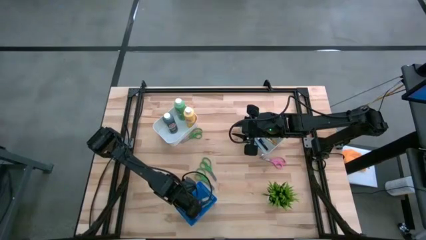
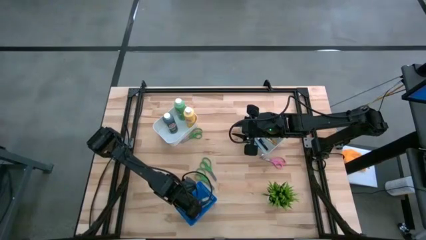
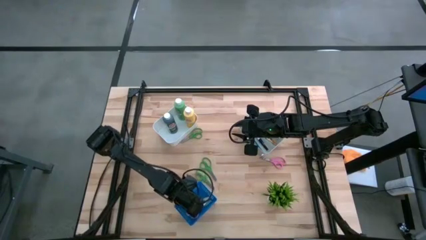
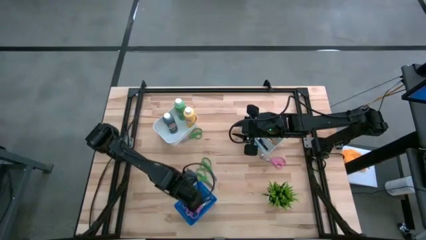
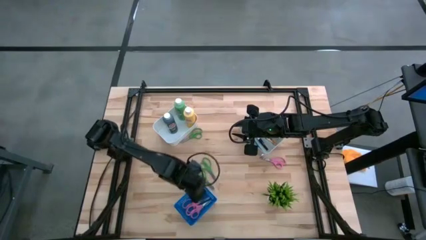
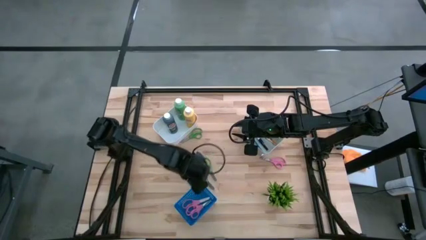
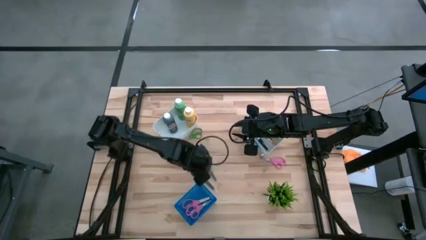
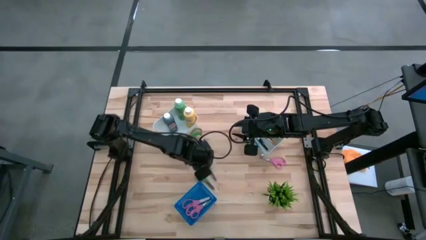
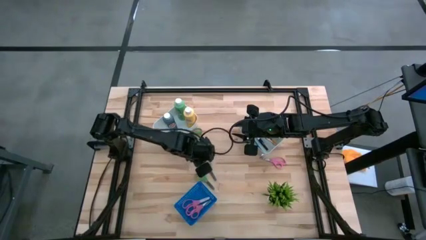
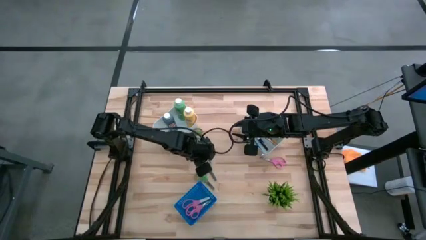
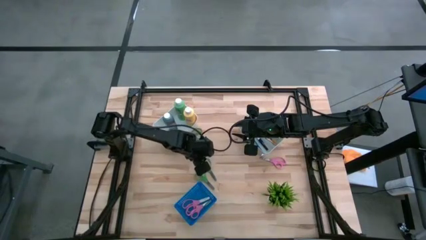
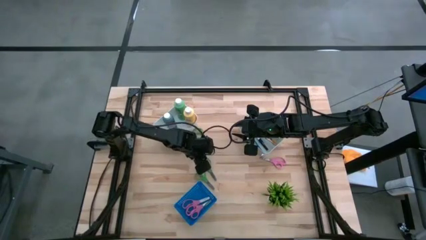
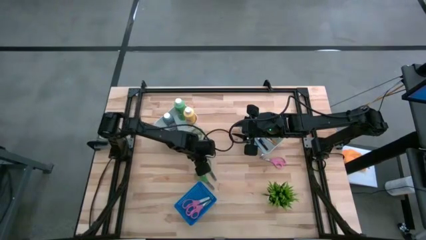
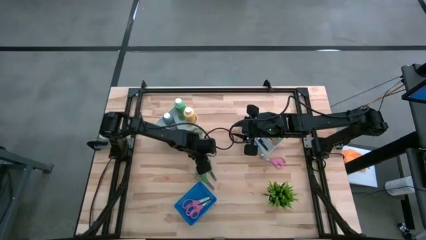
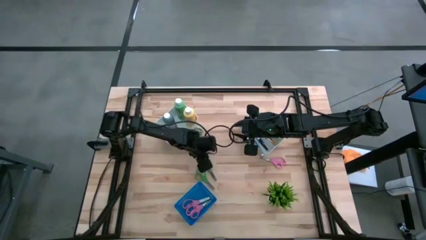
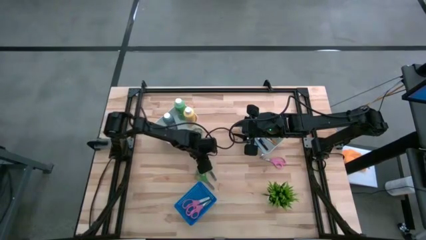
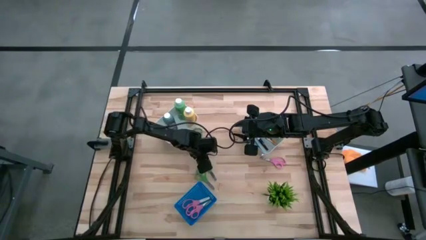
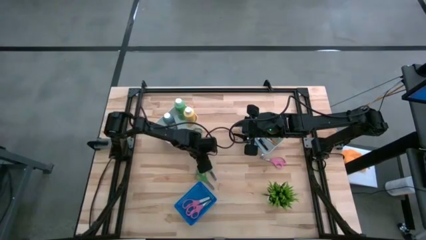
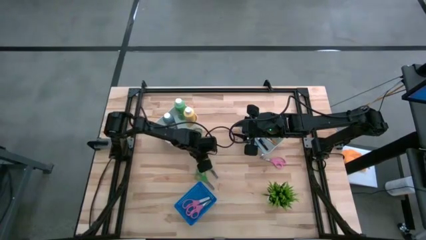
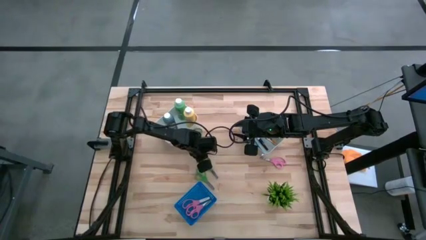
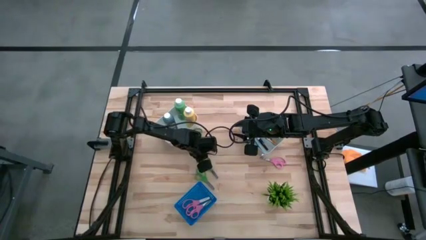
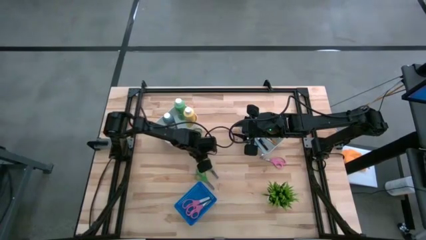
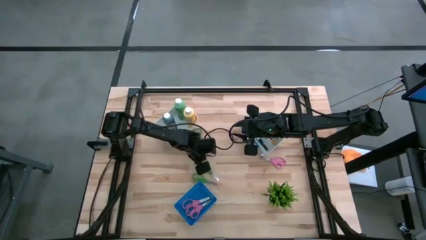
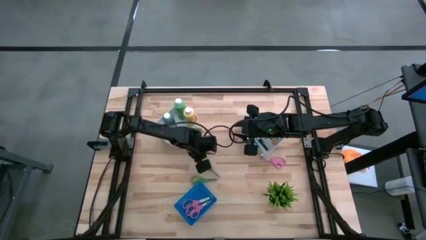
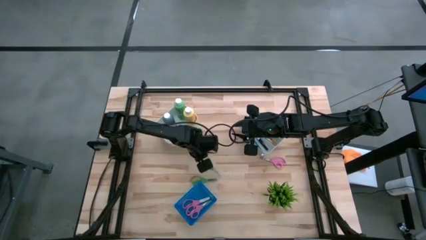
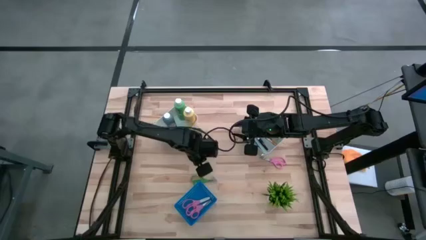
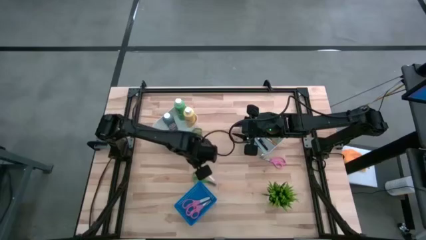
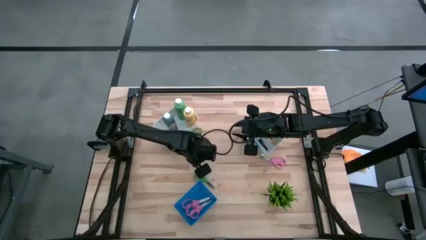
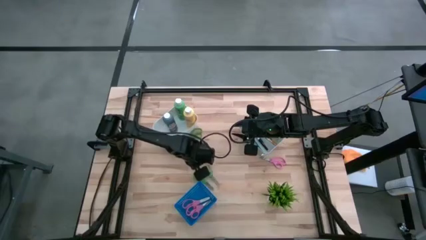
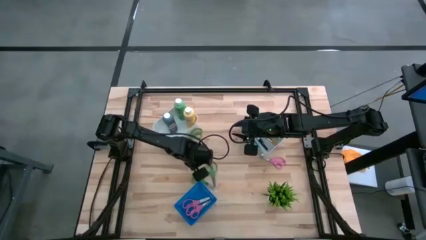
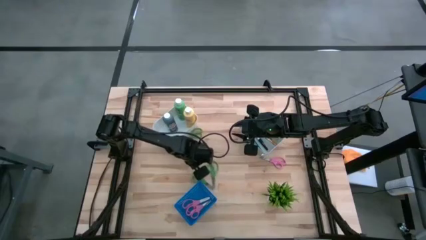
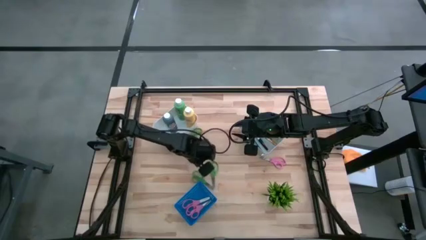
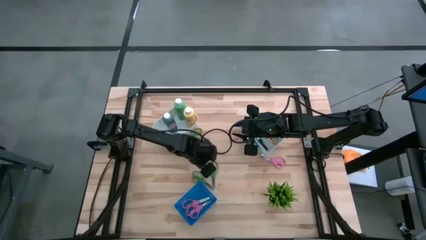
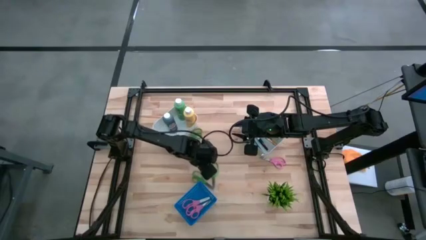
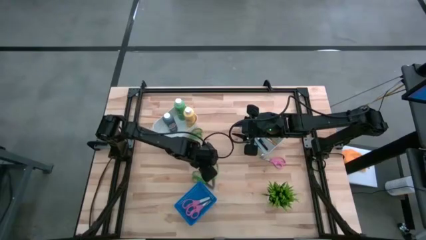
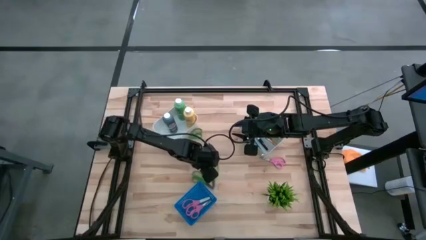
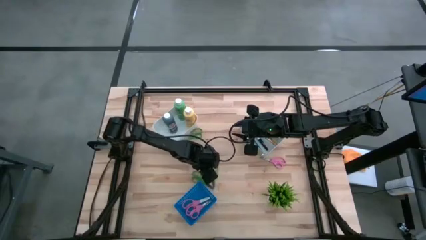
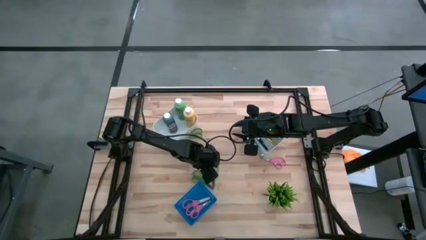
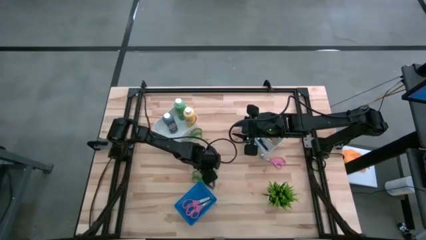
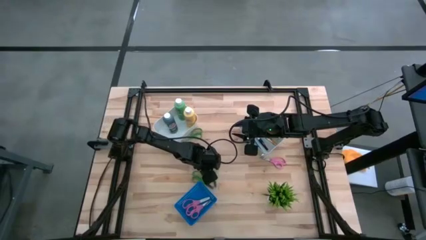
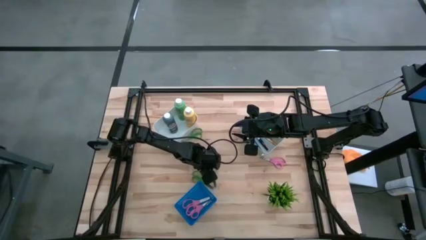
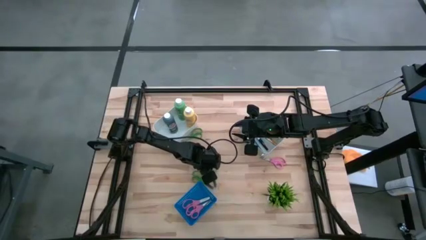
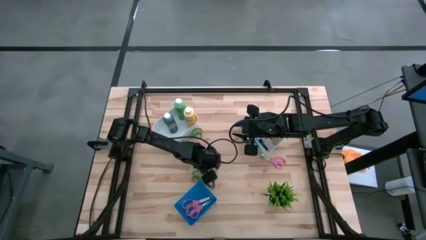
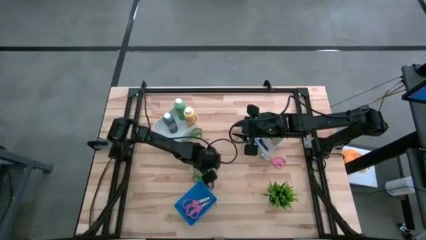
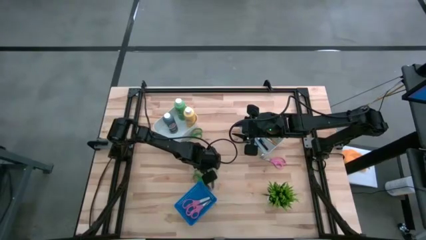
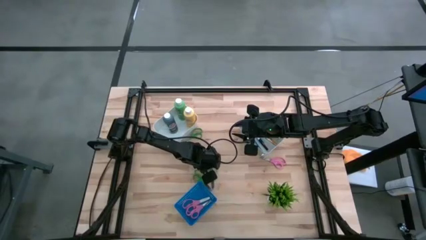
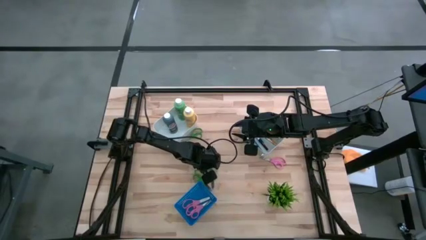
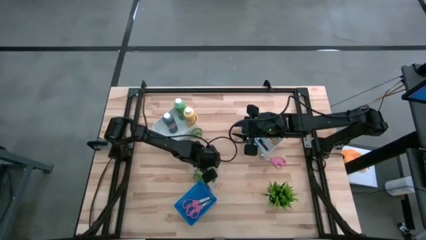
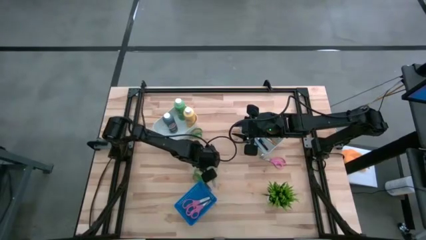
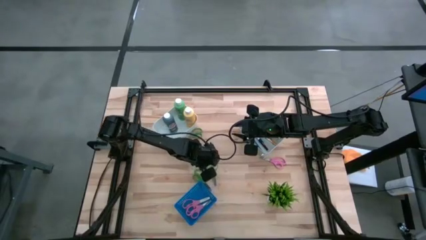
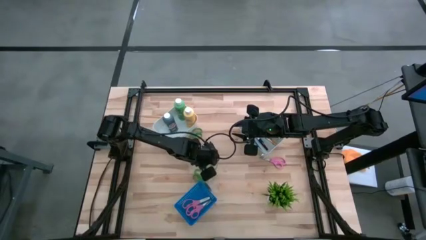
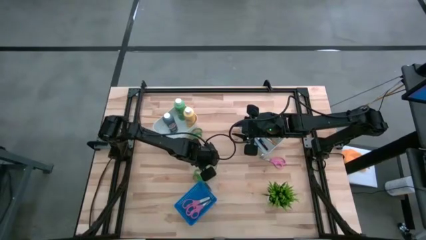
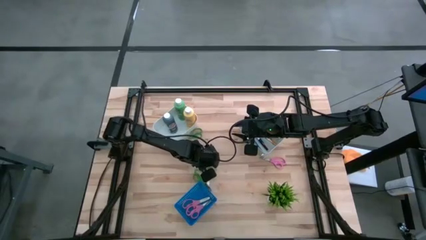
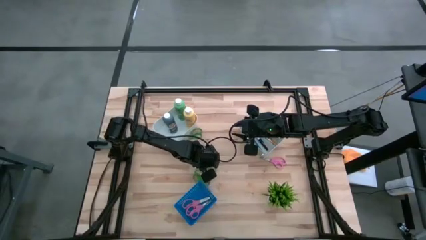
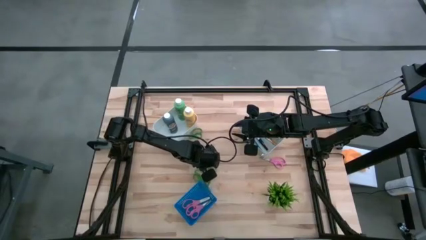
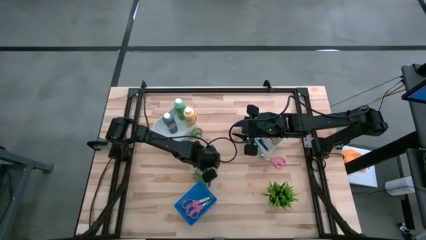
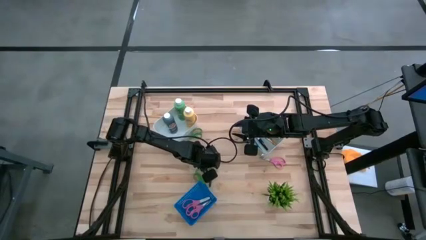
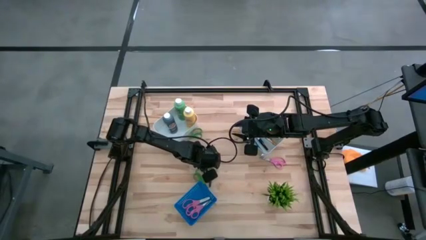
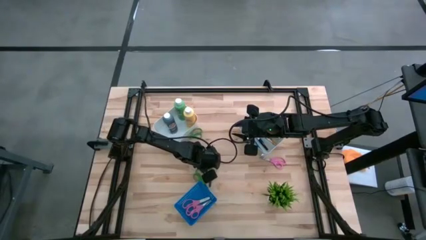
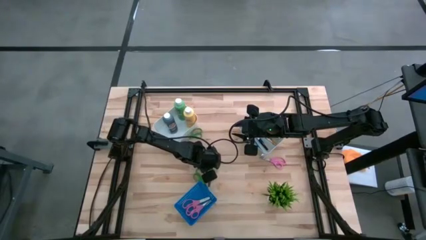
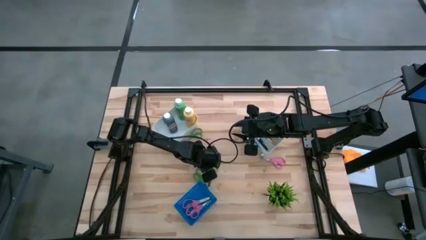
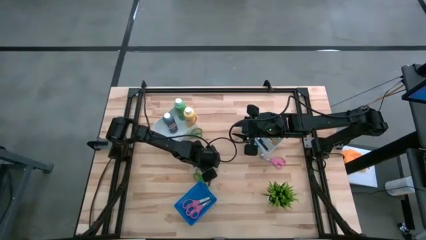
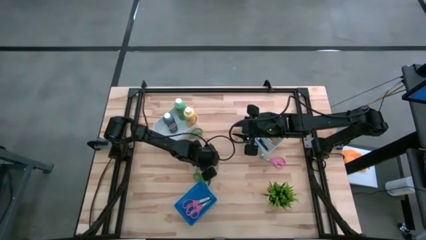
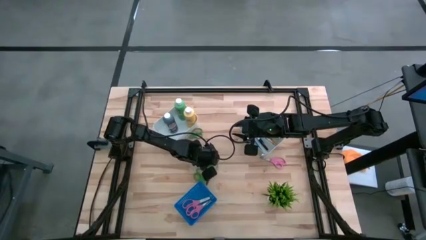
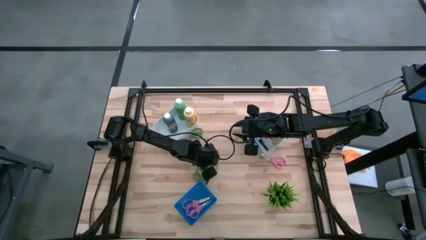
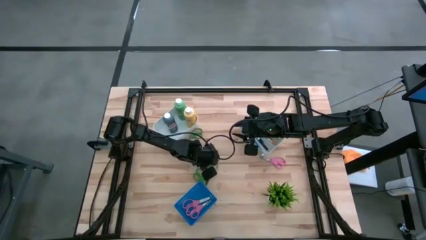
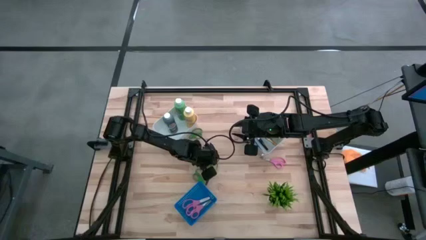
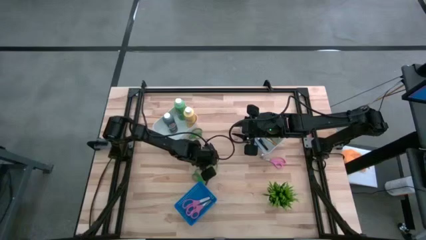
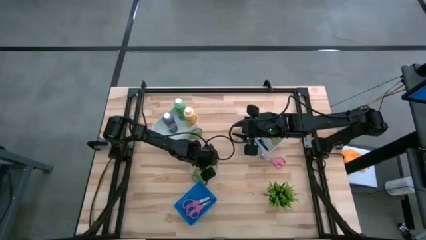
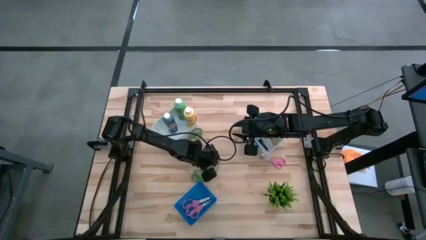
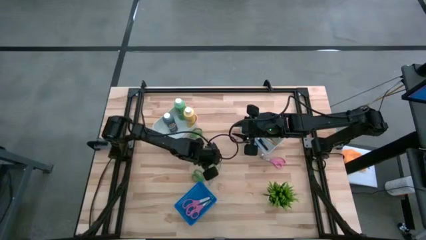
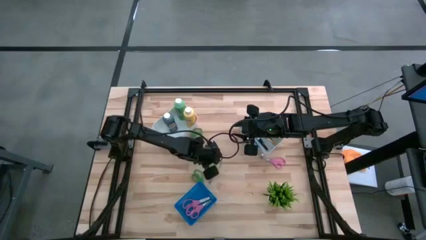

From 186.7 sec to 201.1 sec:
Task: Pick & Place Paint Supplies
Put the green scissors into the blue bin
